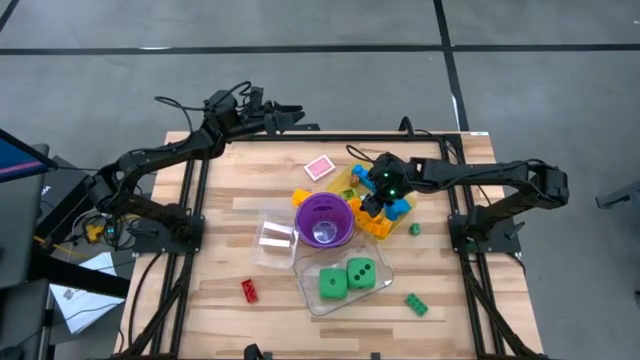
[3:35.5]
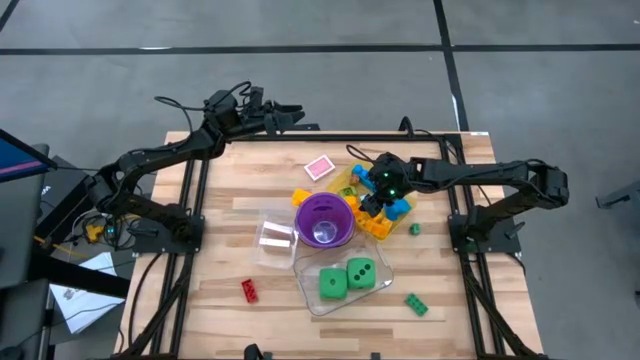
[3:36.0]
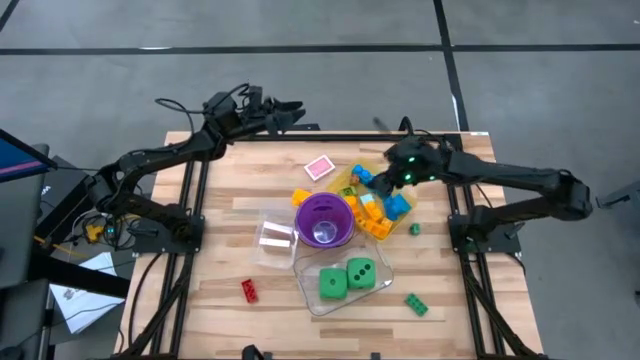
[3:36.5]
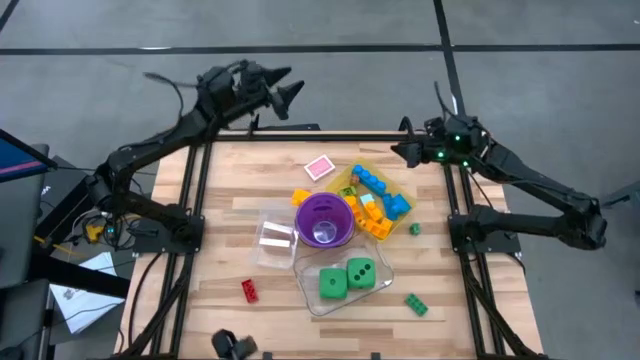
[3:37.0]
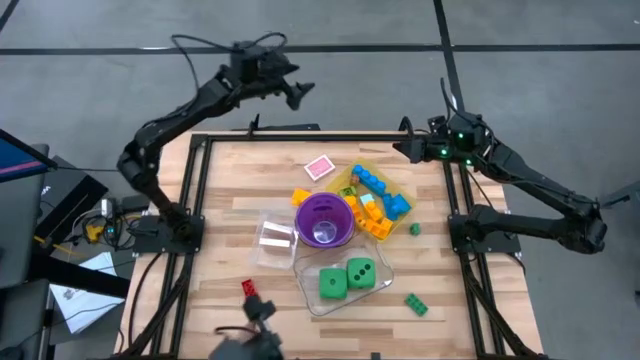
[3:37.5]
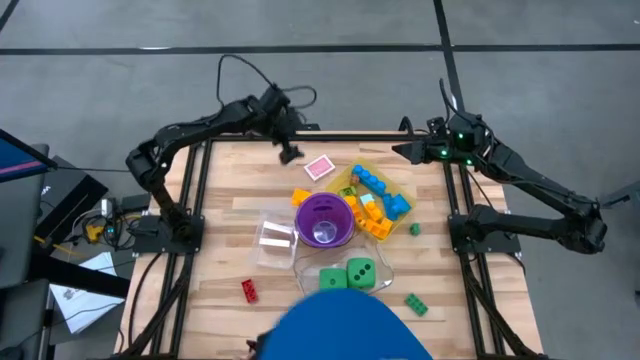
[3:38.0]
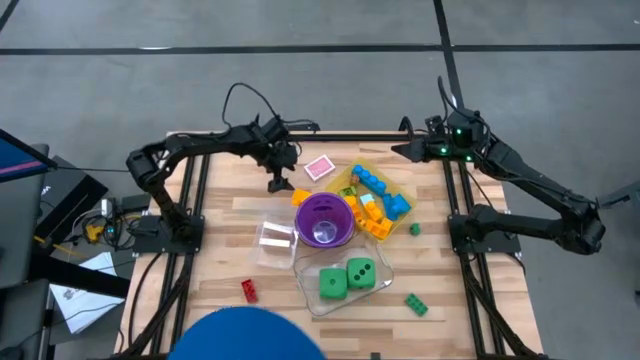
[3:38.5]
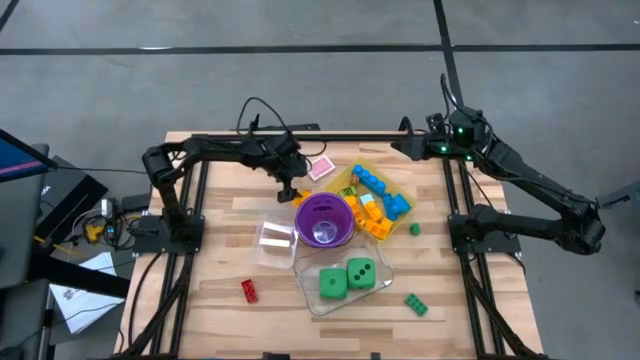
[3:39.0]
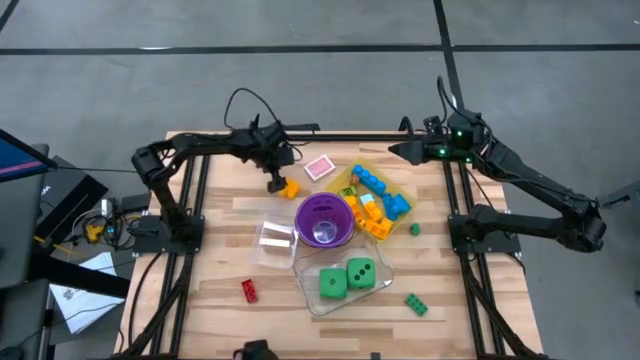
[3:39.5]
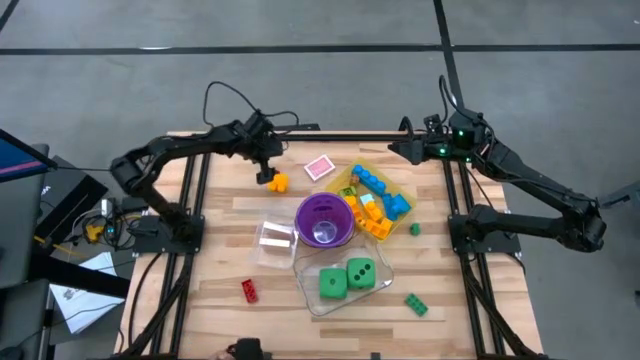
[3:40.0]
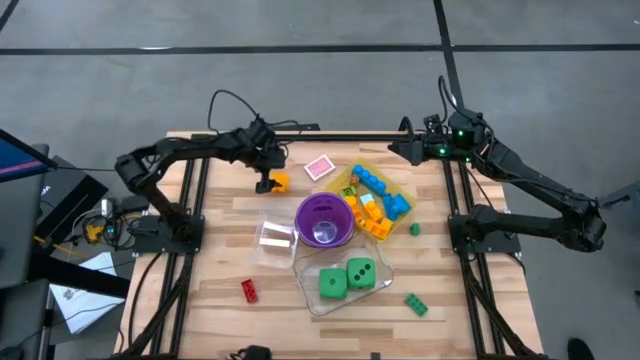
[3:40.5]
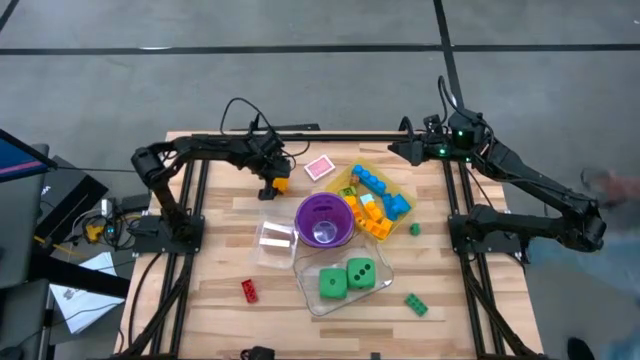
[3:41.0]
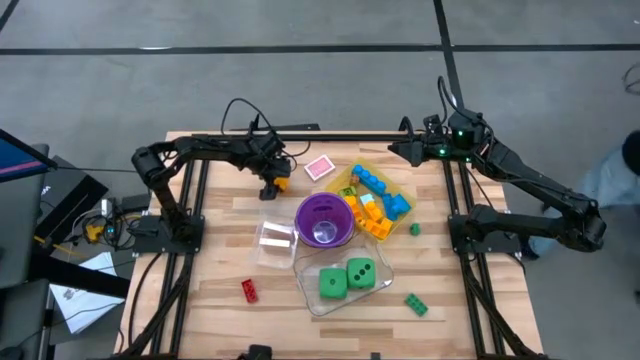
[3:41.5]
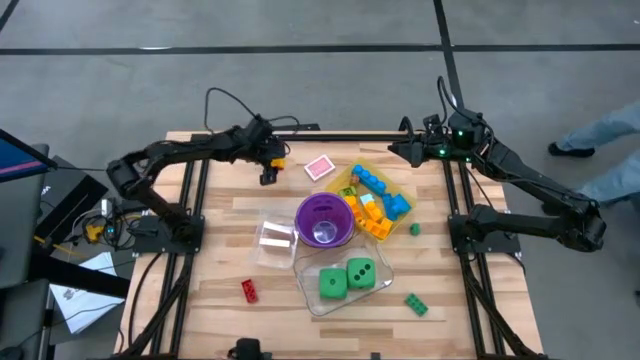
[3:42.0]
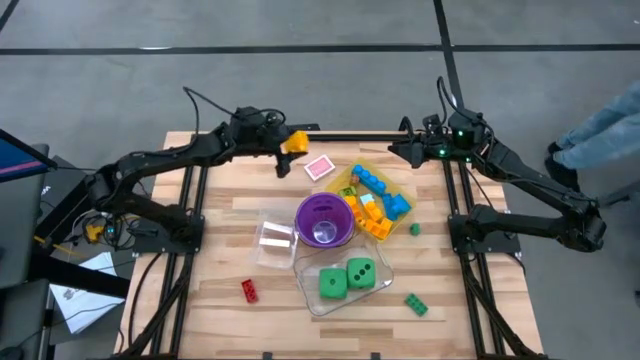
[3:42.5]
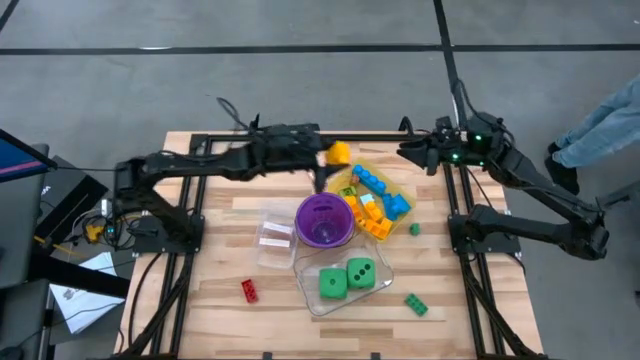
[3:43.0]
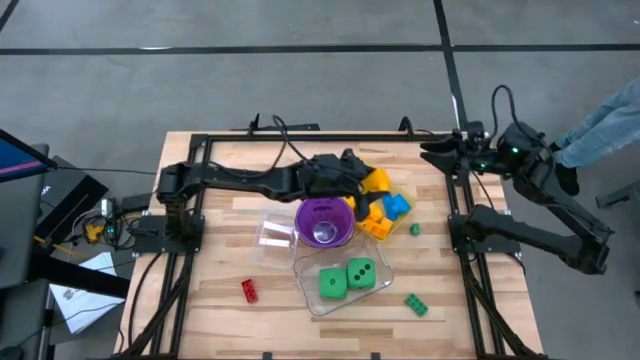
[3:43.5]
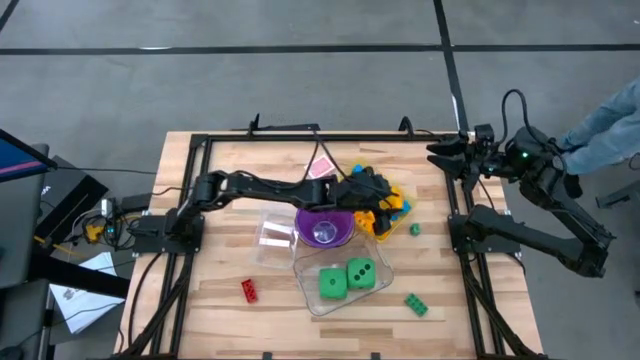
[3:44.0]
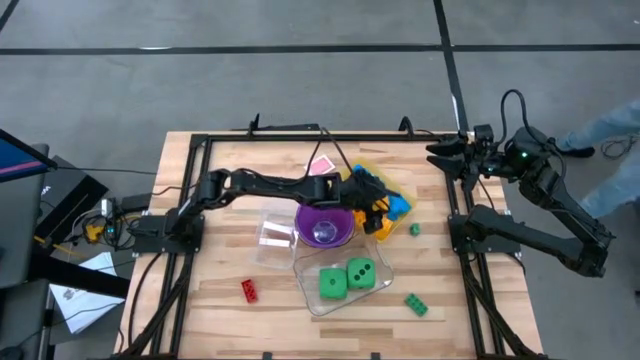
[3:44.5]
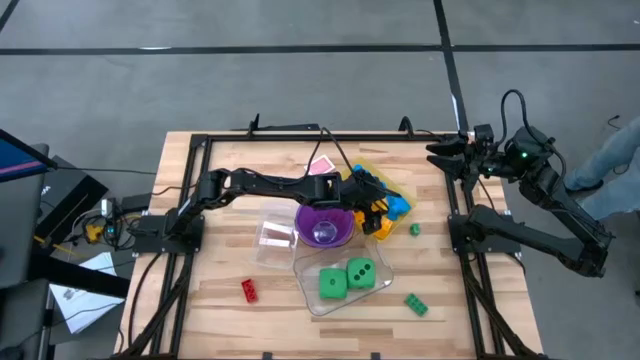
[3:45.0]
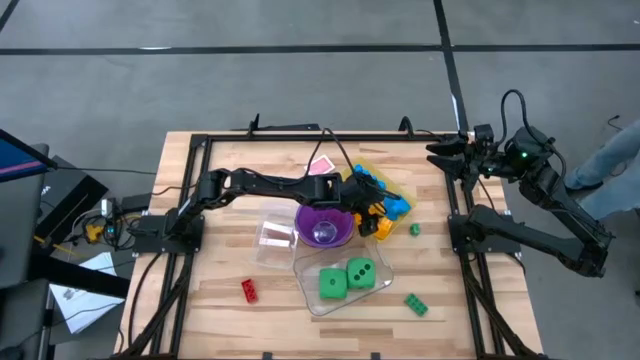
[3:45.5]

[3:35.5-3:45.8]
Task: Pick & Place Toys
Put the yellow game piece into the yellow bin

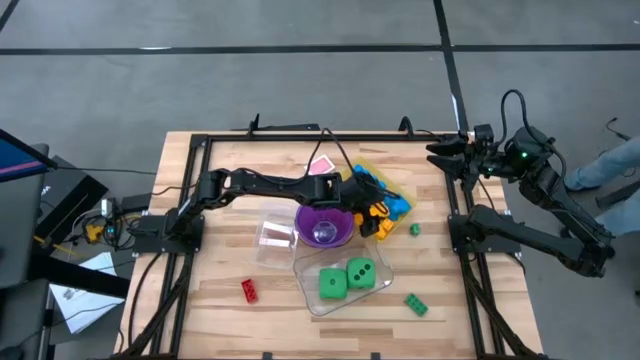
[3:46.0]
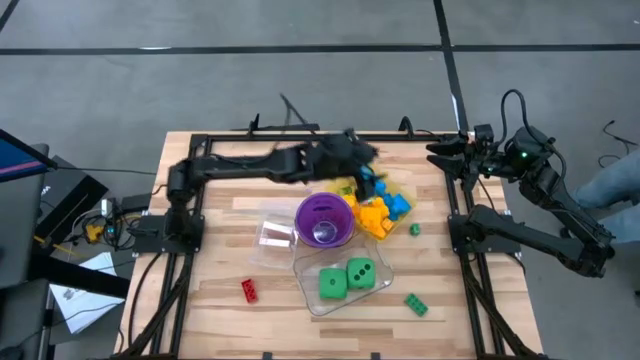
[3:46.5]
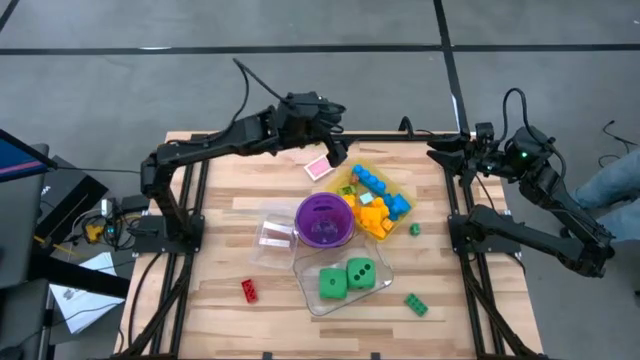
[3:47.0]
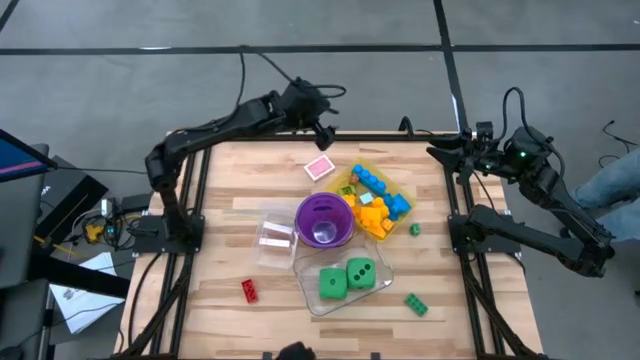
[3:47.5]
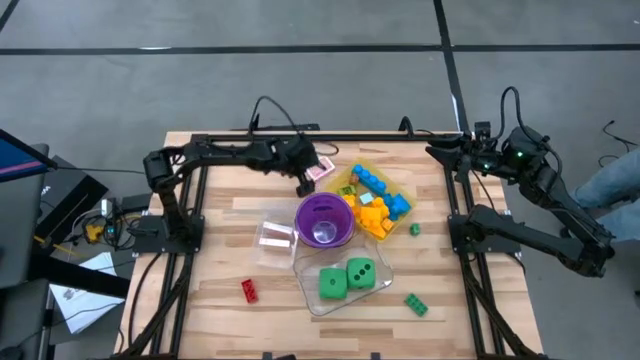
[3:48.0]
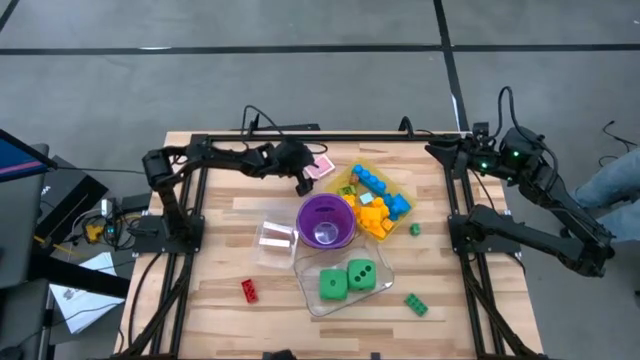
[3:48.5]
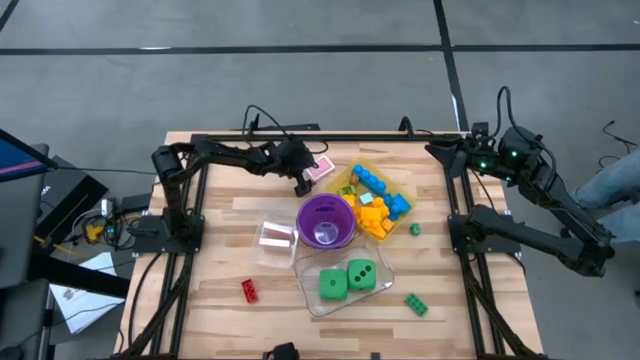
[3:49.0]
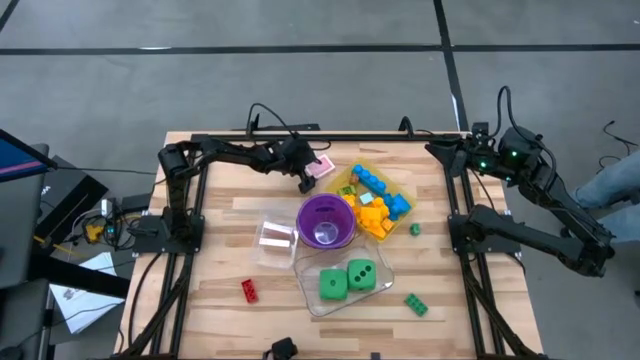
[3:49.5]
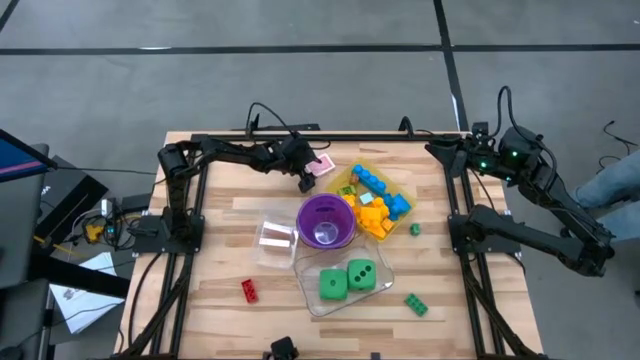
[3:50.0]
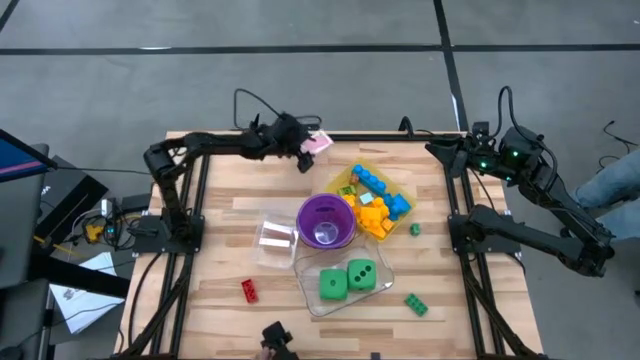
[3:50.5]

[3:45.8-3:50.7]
Put the red deck of cards into the white bin

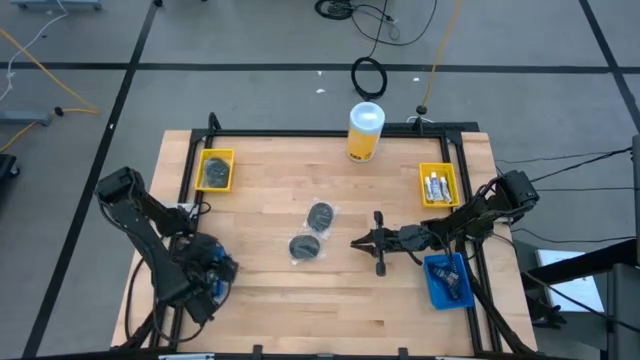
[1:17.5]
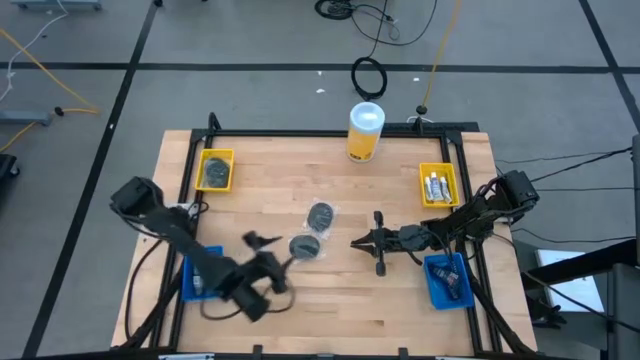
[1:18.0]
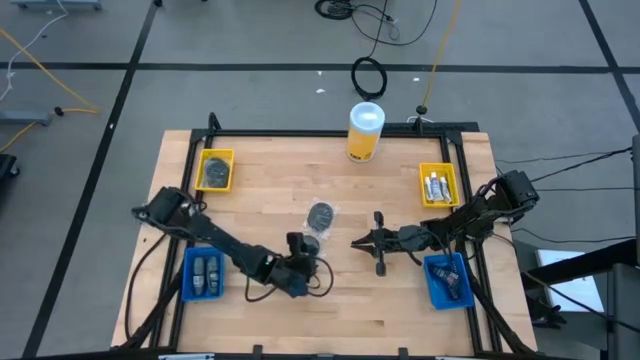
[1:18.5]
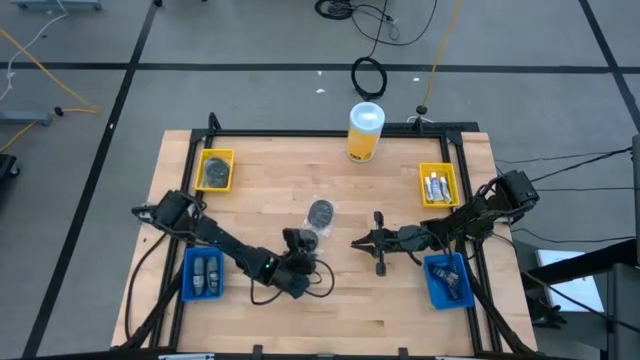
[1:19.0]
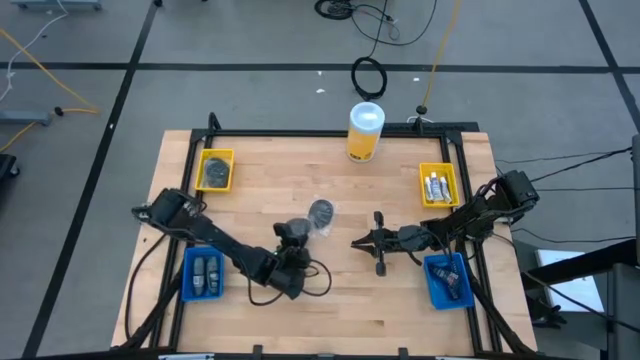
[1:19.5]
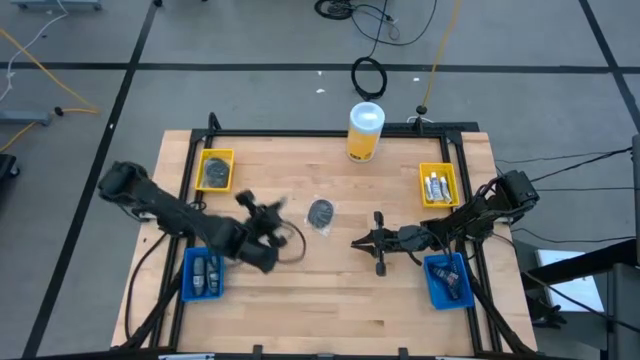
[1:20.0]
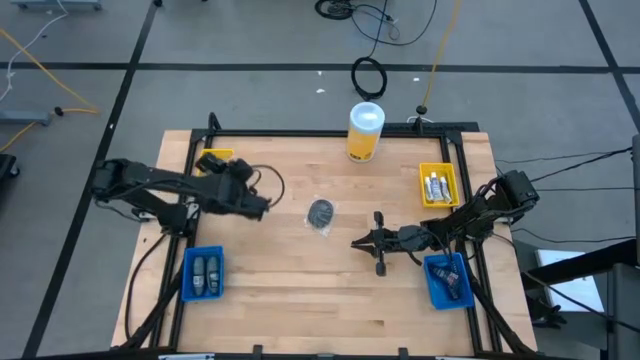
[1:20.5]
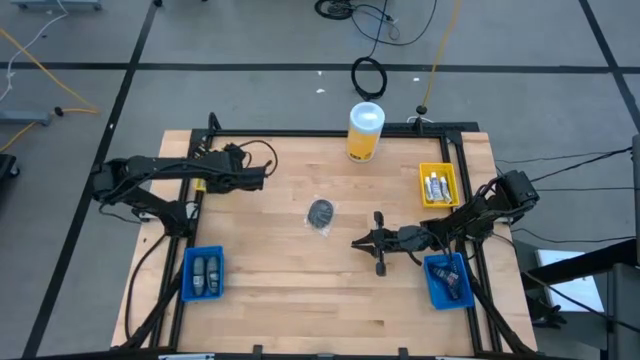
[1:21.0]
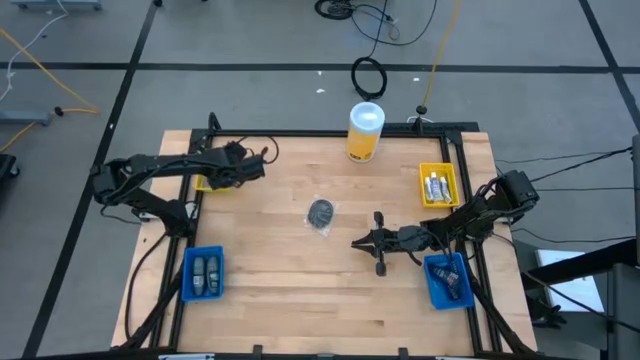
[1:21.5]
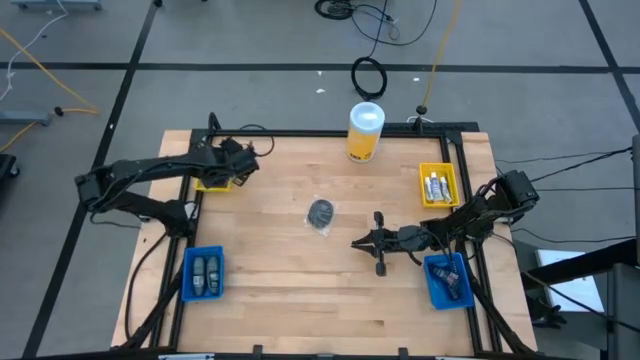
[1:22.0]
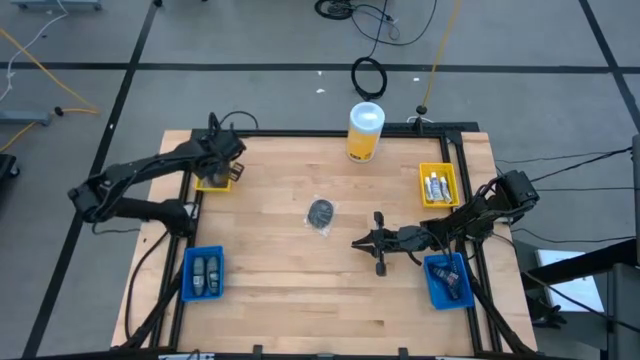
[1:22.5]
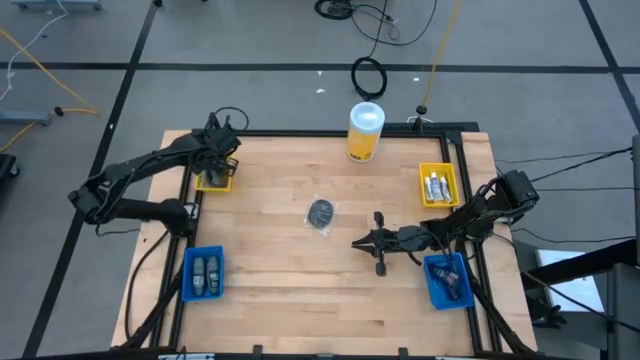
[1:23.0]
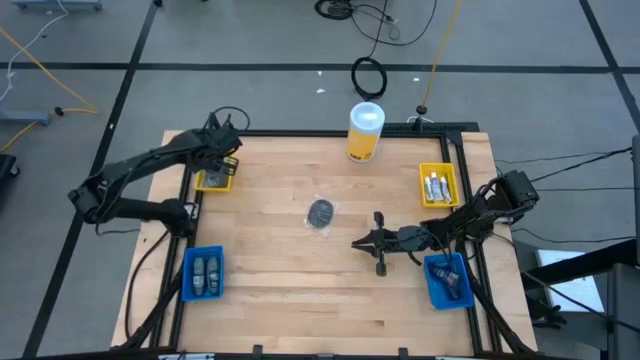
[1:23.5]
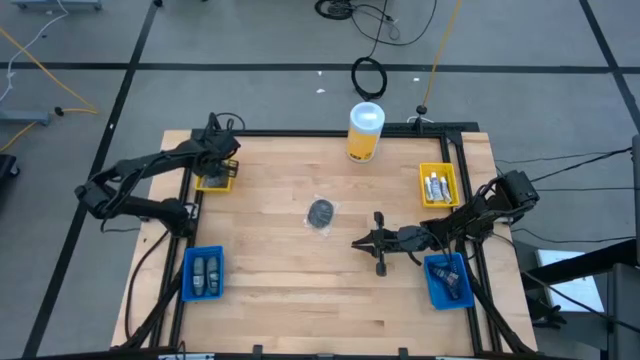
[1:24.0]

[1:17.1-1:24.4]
Task: Pick & Place Travel size toiletries
Put the black hairbrush into the left yellow bin
